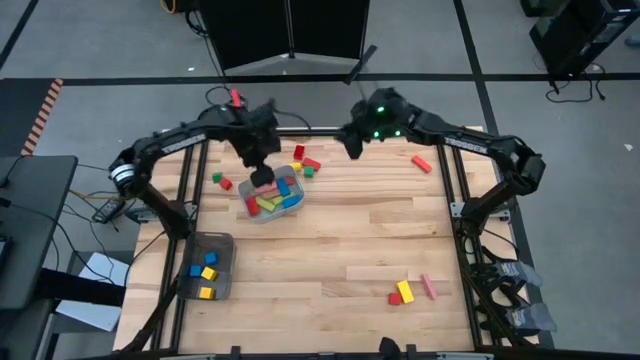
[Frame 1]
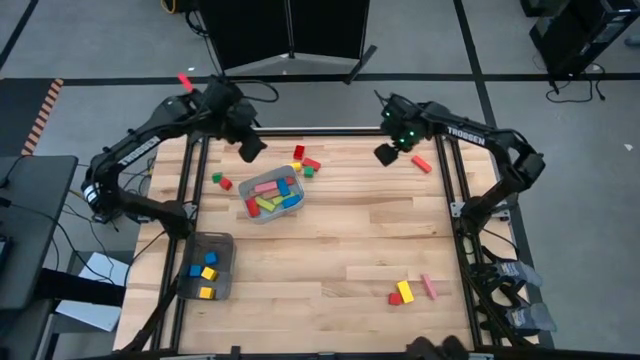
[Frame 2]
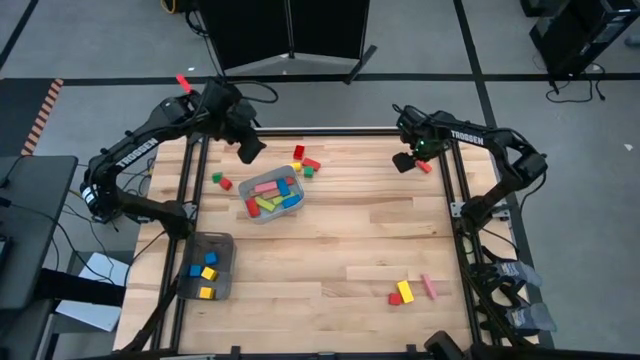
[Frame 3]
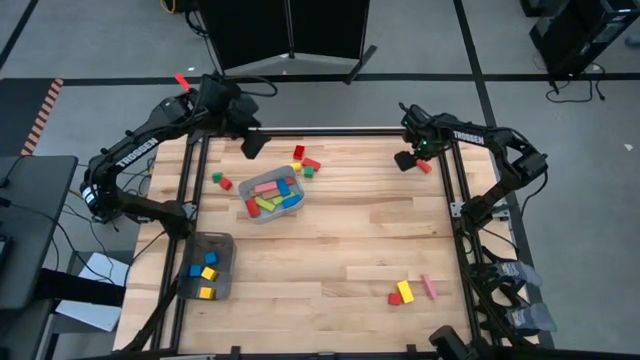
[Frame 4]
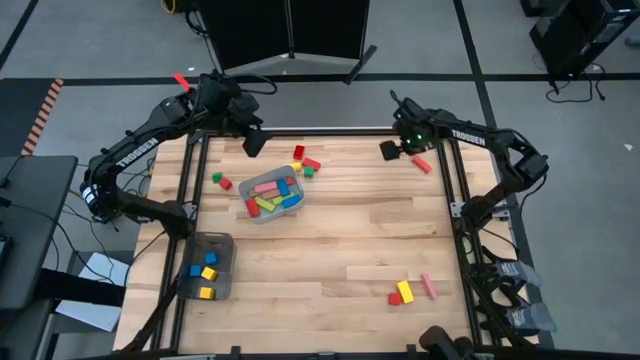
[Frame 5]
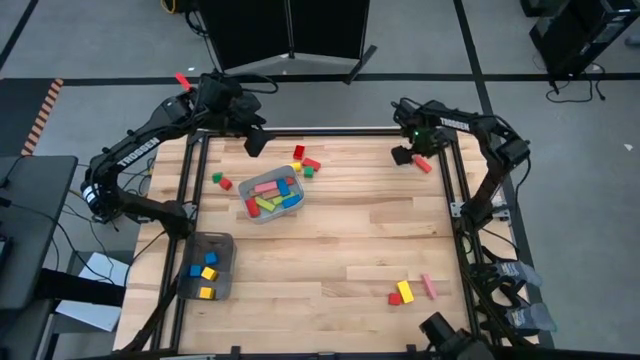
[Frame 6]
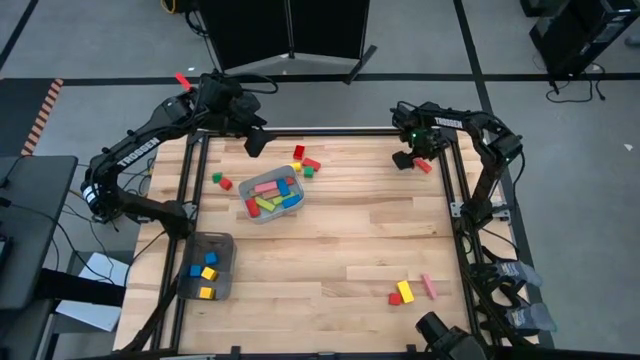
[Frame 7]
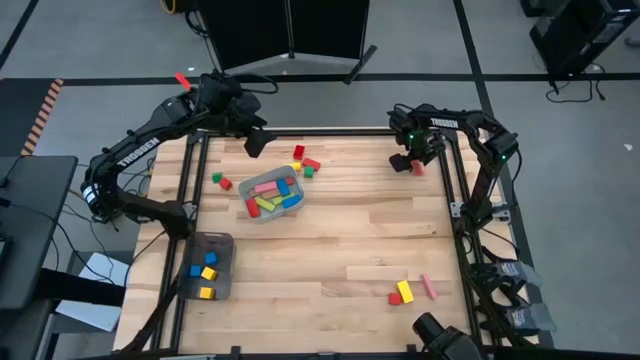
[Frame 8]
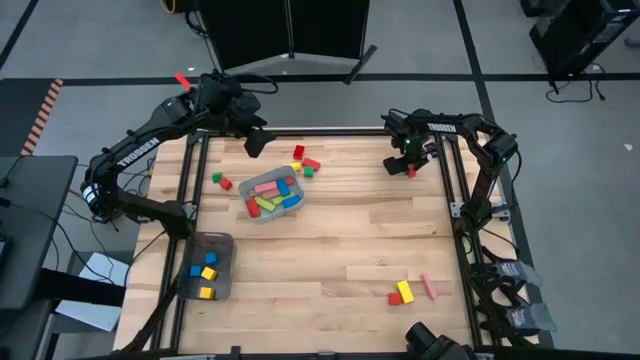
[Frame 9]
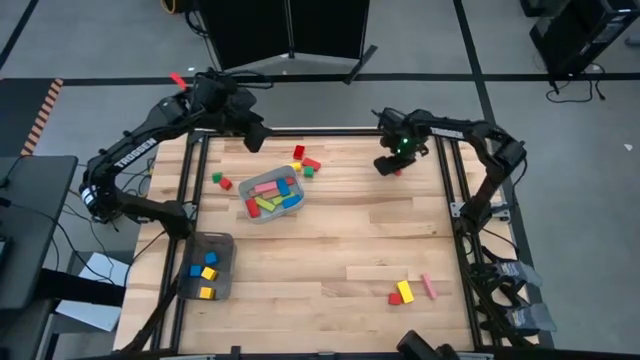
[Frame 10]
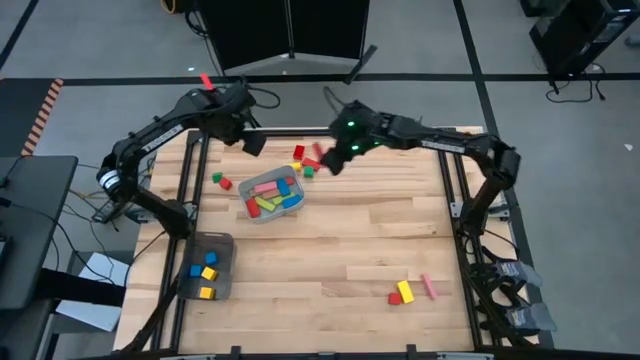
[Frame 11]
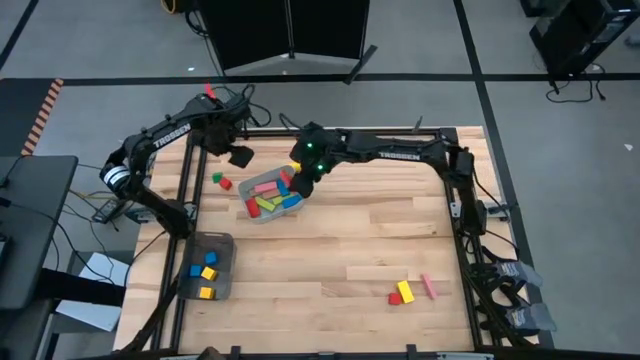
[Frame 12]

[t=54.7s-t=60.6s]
Task: Sort blocks by size
Put the orange rectangular block into the gray bin

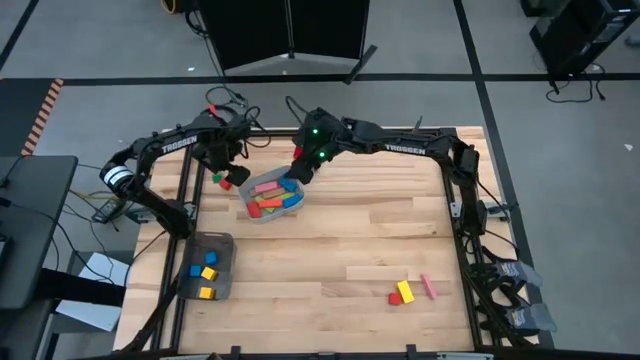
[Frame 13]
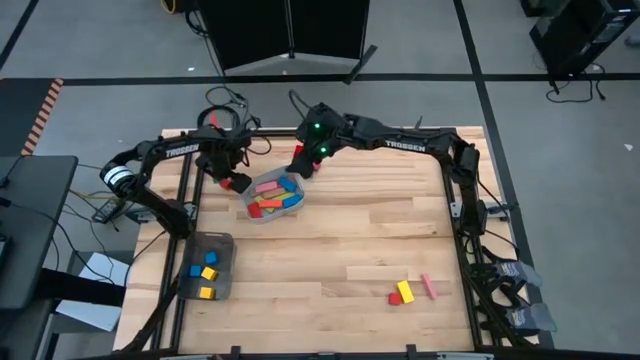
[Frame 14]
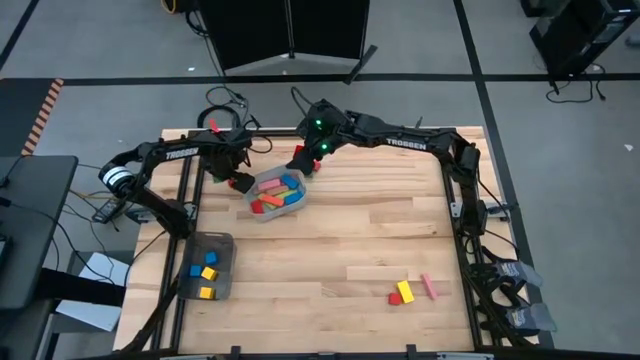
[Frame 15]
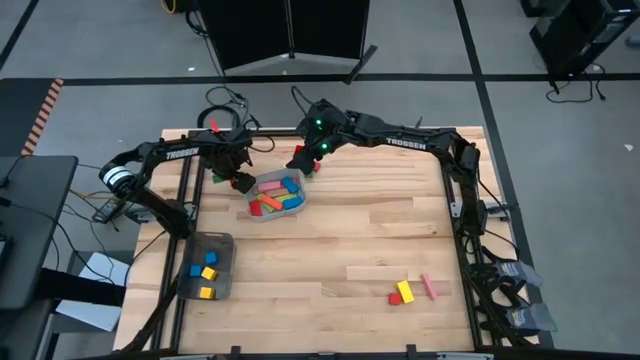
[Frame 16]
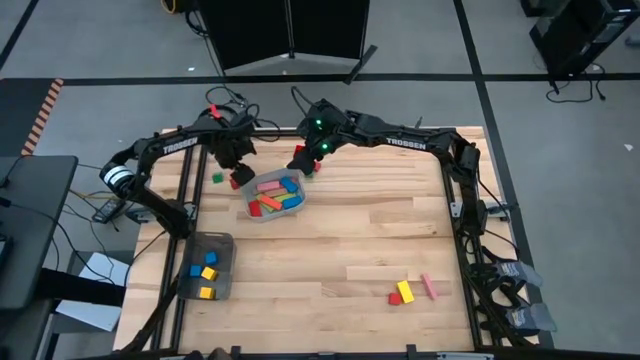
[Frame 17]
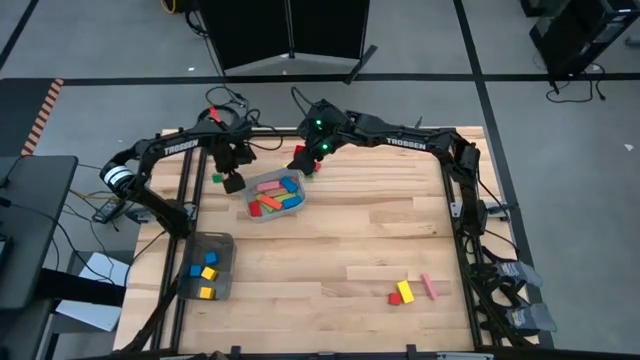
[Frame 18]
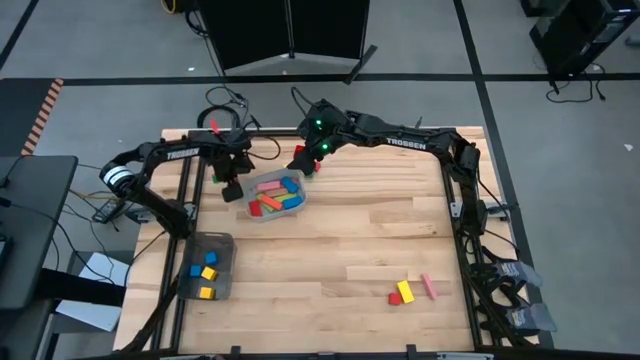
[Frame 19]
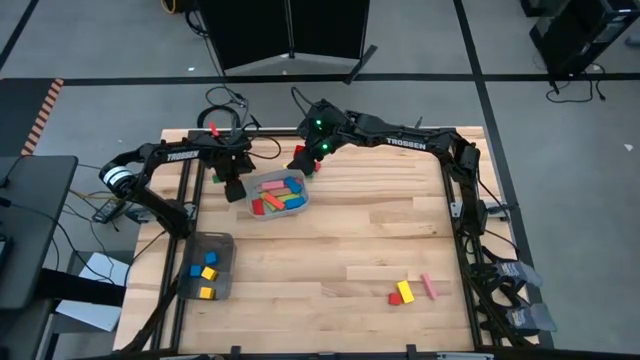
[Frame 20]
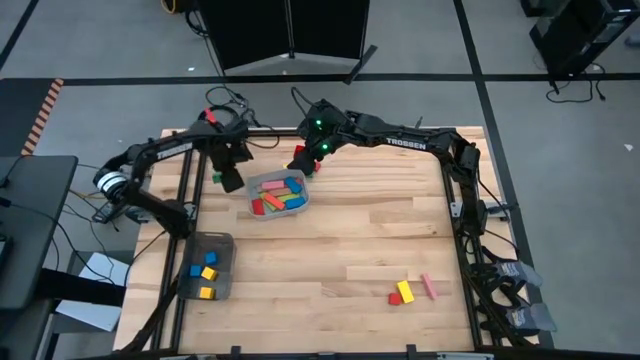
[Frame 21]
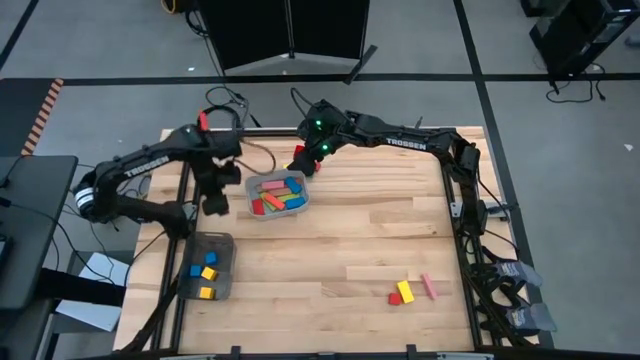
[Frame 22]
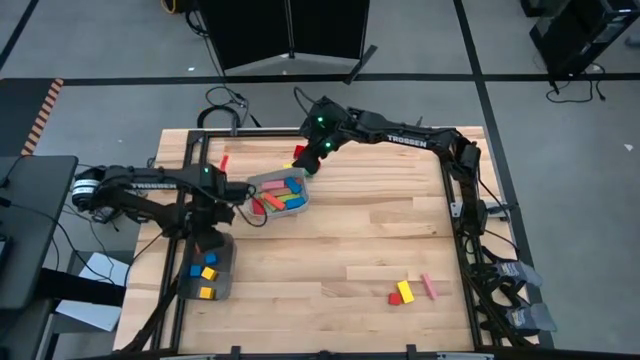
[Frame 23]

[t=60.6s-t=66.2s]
Put the orange square block into the black bin

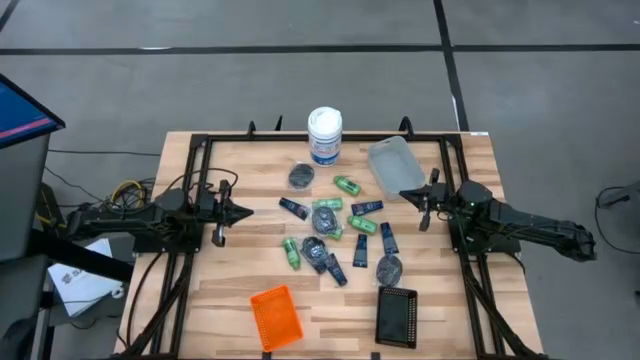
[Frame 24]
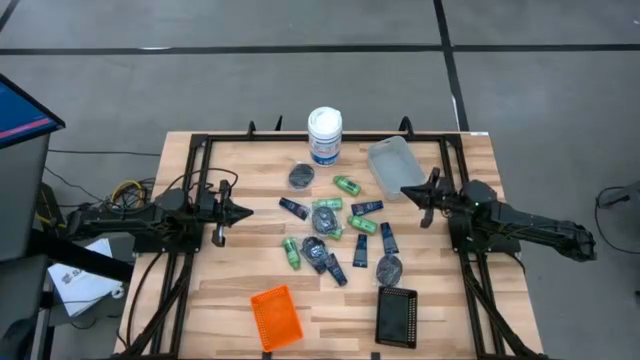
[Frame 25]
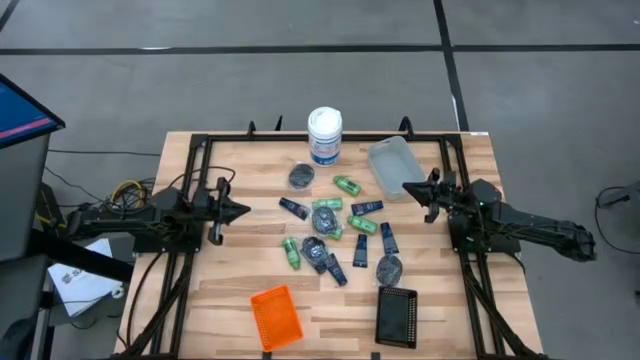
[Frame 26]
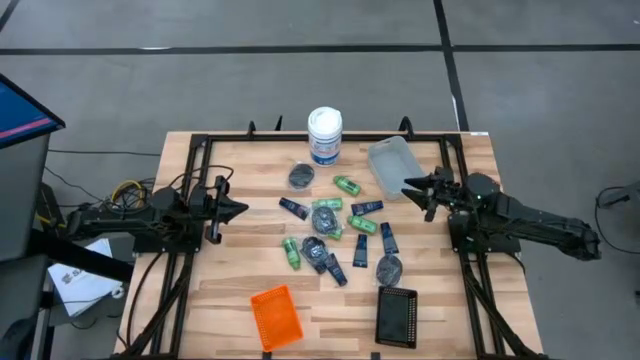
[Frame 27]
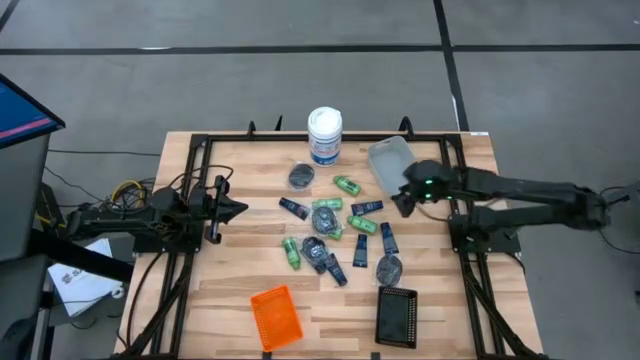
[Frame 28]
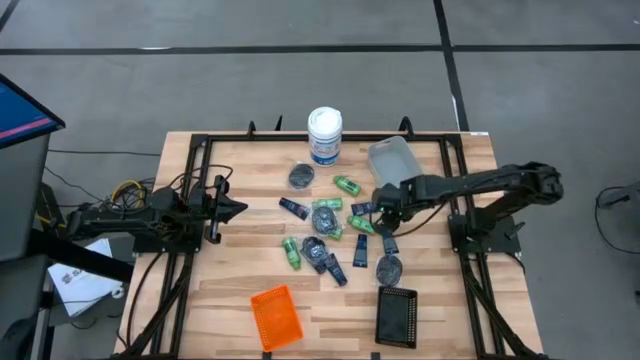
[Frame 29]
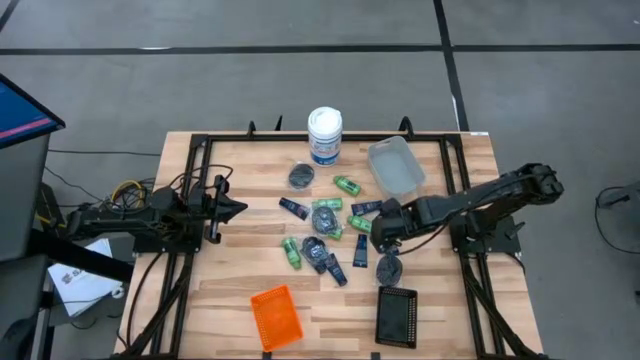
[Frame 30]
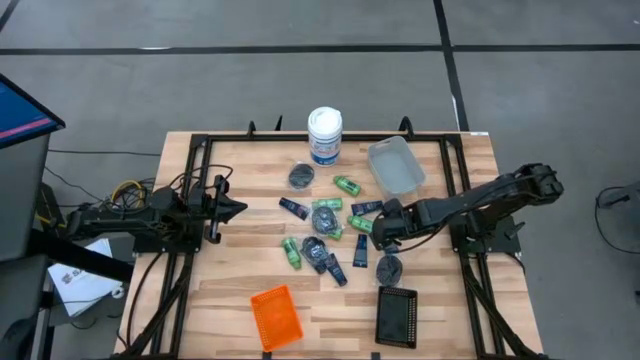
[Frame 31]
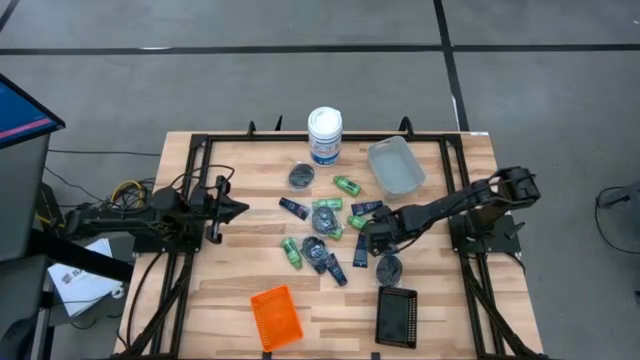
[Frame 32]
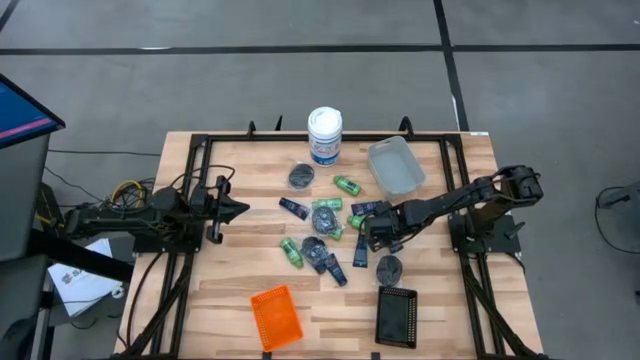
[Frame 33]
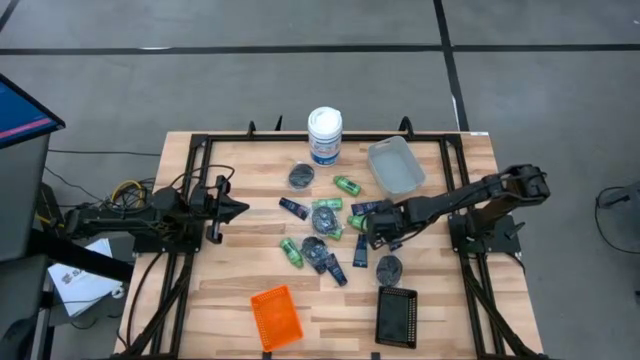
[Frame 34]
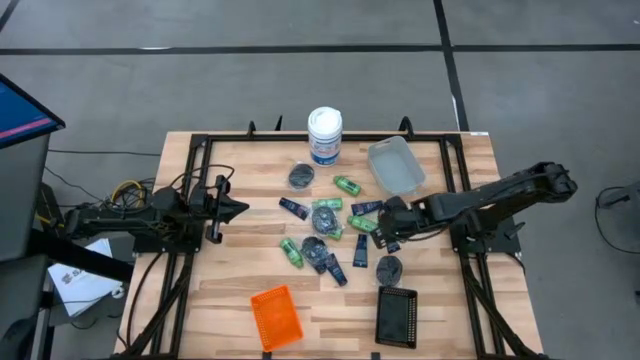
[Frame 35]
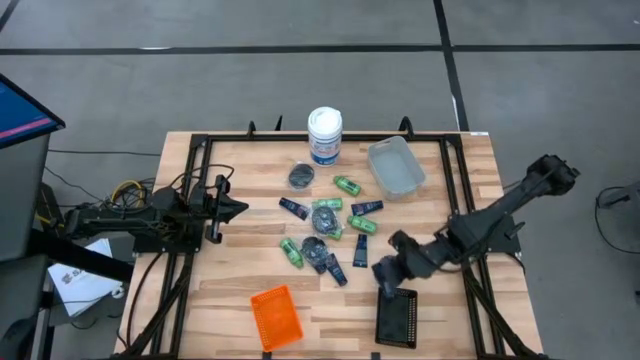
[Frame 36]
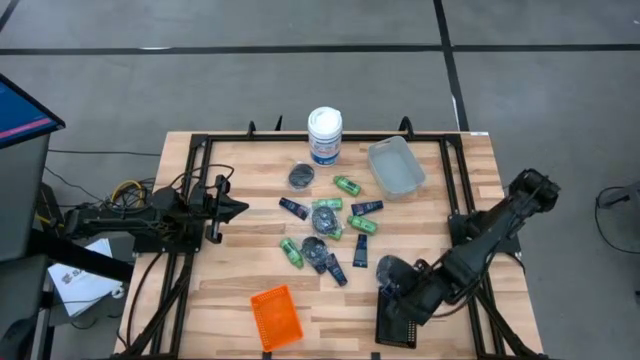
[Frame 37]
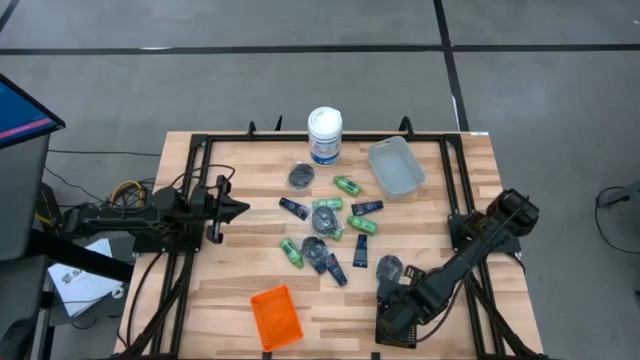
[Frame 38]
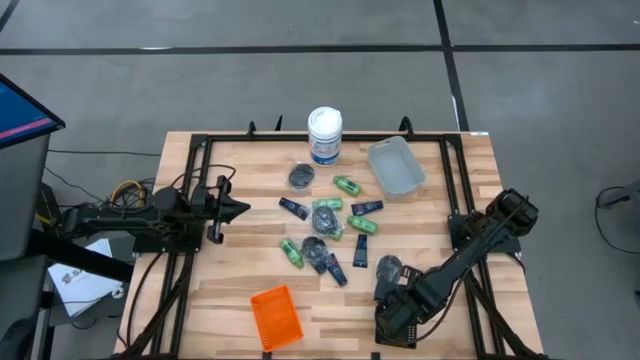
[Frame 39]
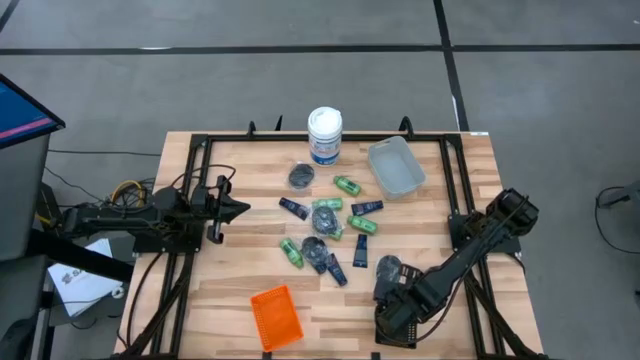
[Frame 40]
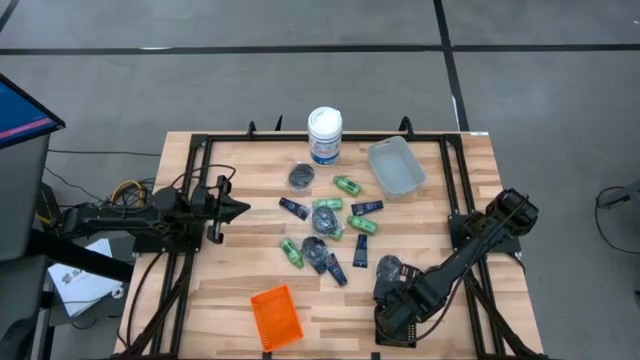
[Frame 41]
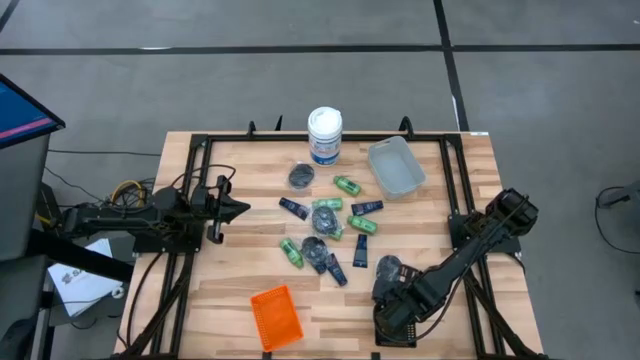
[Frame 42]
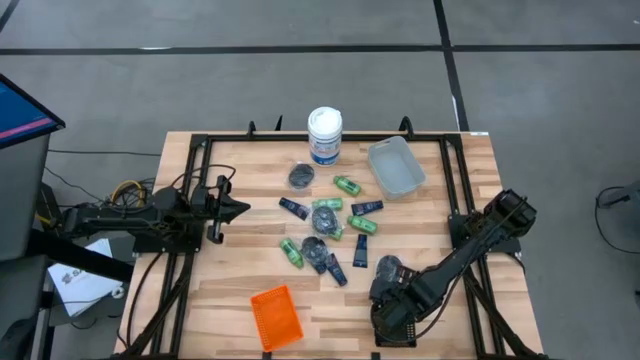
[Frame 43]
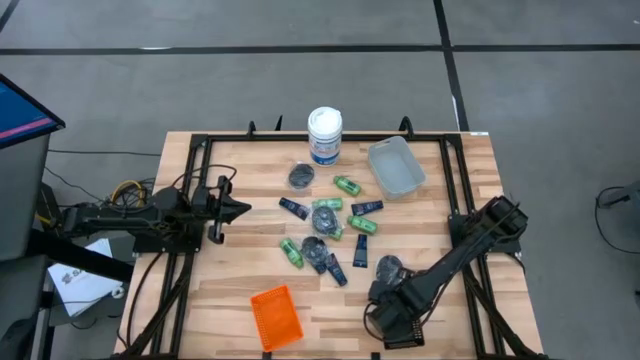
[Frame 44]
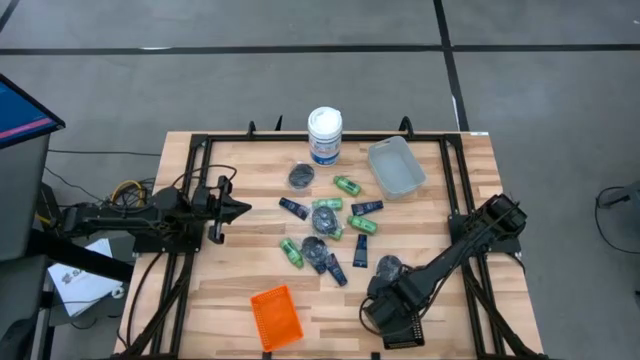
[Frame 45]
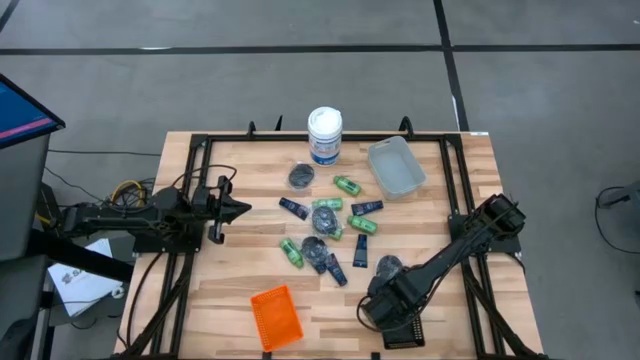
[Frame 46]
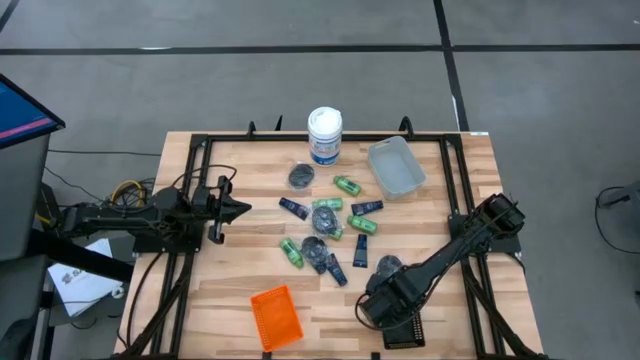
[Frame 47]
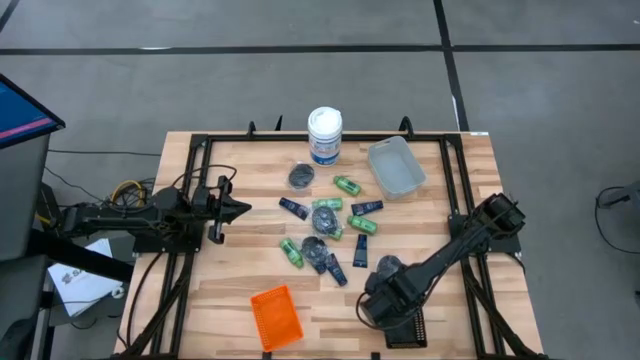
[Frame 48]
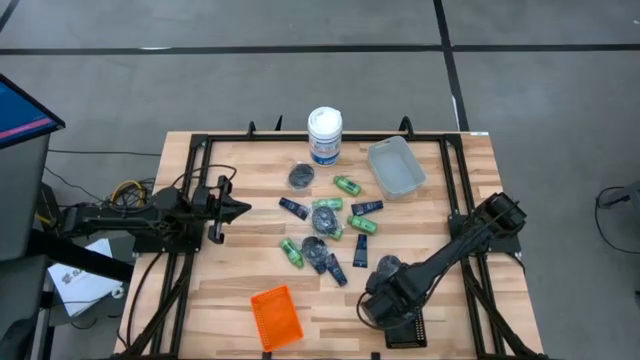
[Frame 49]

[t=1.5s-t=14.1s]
Task: Pick & Place Travel size toiletries
Put the blue shave cream into the black basket
